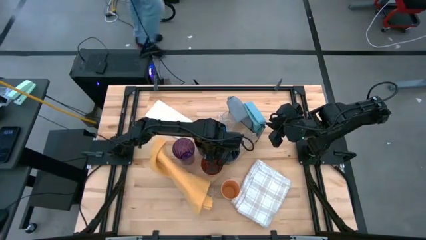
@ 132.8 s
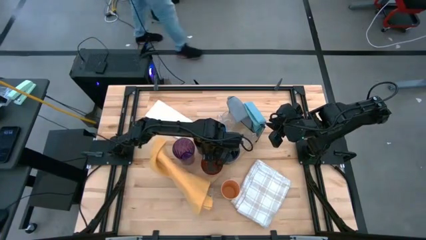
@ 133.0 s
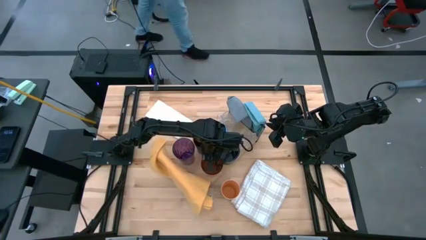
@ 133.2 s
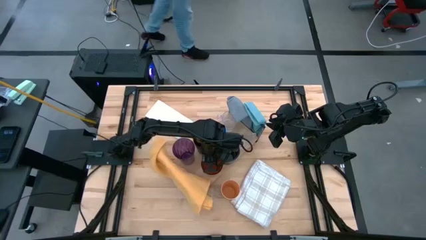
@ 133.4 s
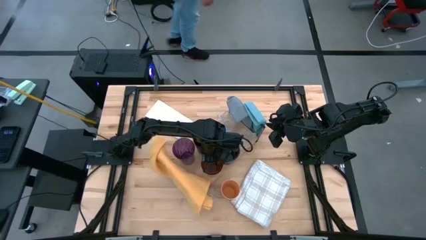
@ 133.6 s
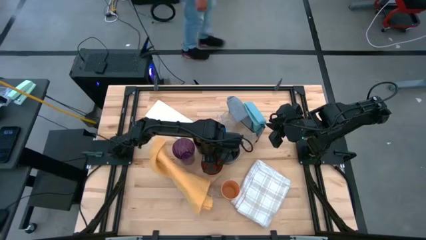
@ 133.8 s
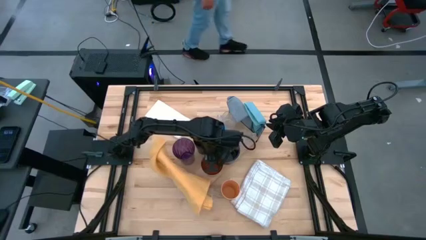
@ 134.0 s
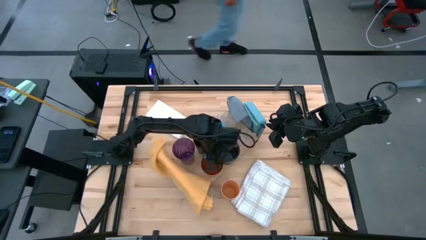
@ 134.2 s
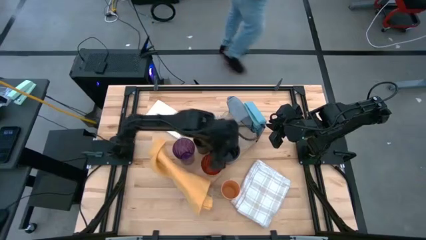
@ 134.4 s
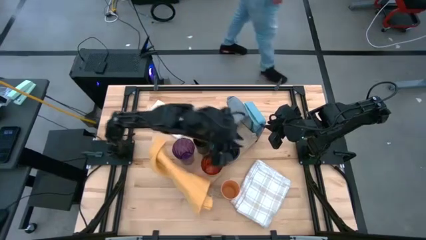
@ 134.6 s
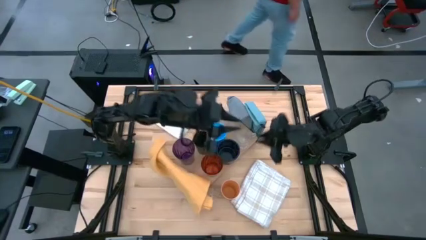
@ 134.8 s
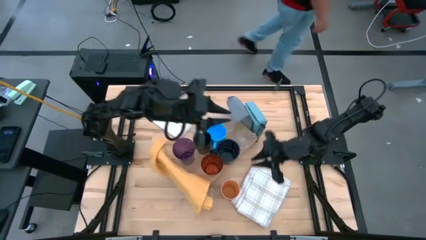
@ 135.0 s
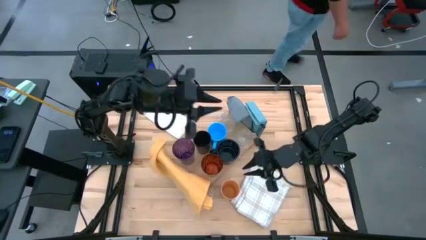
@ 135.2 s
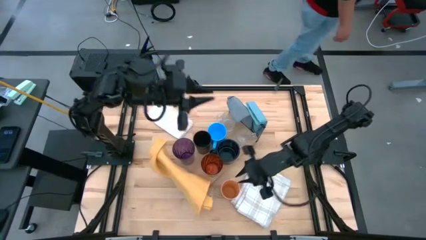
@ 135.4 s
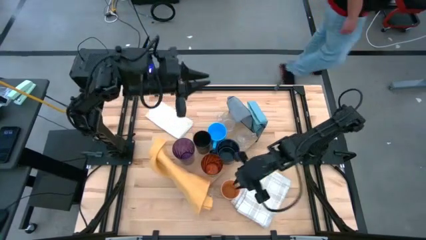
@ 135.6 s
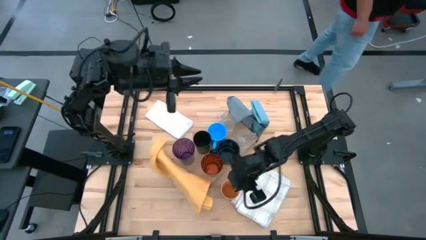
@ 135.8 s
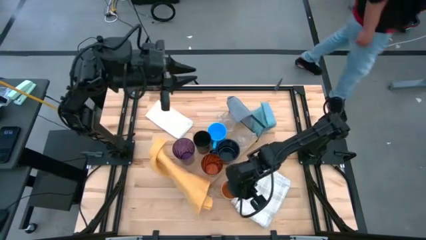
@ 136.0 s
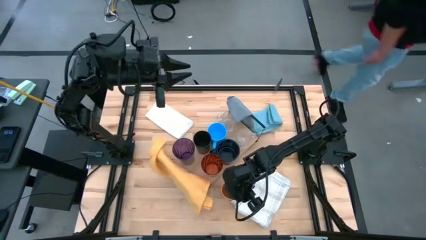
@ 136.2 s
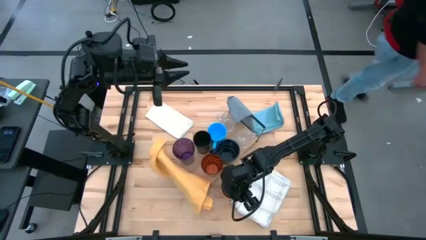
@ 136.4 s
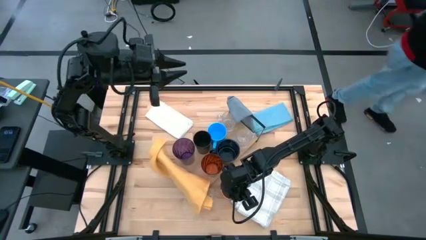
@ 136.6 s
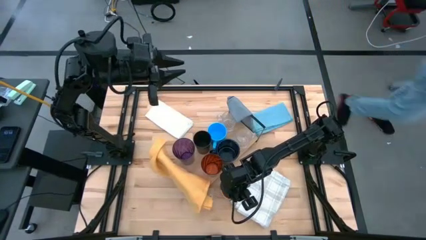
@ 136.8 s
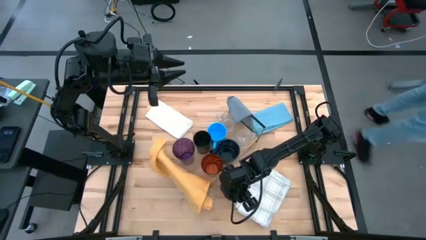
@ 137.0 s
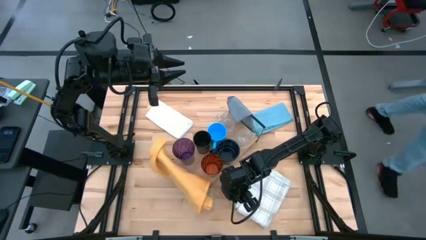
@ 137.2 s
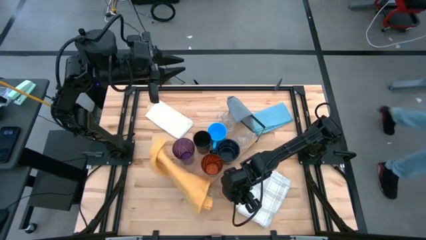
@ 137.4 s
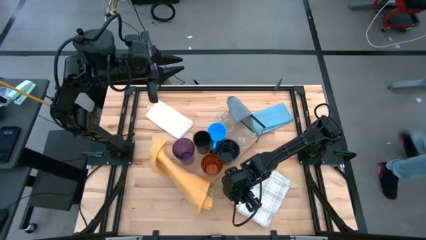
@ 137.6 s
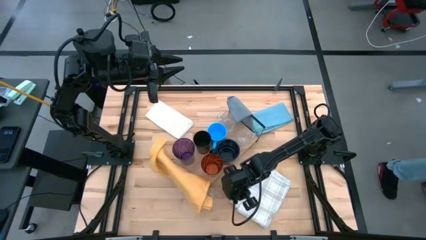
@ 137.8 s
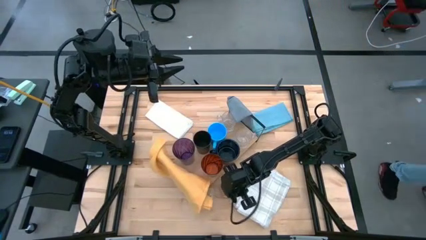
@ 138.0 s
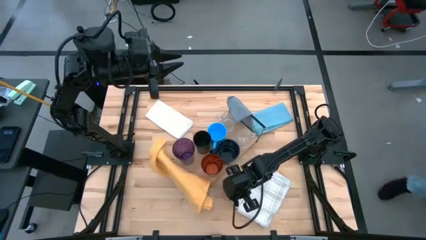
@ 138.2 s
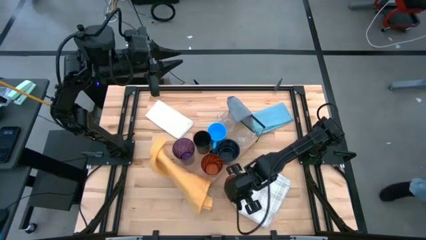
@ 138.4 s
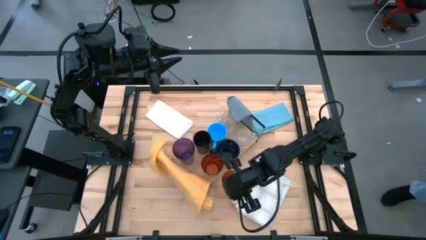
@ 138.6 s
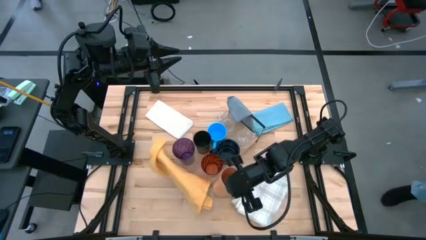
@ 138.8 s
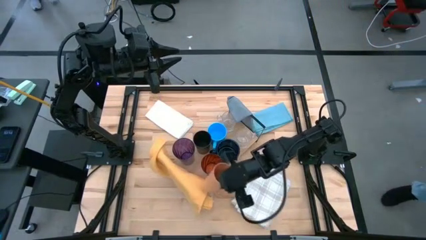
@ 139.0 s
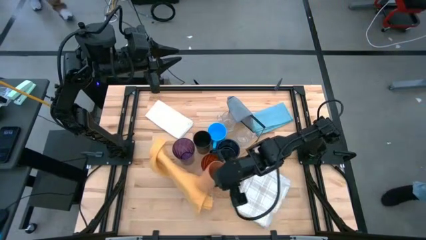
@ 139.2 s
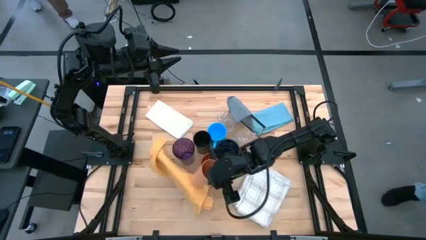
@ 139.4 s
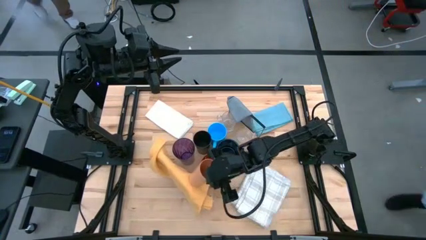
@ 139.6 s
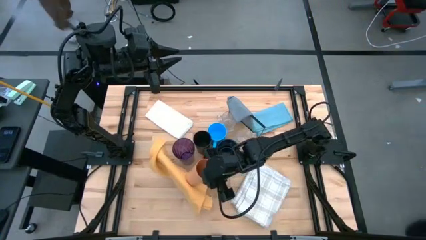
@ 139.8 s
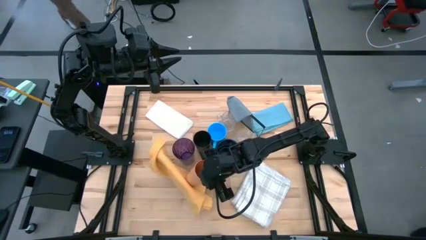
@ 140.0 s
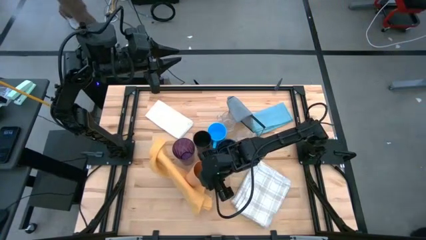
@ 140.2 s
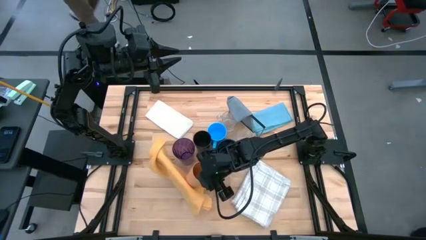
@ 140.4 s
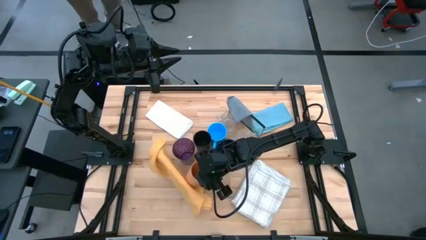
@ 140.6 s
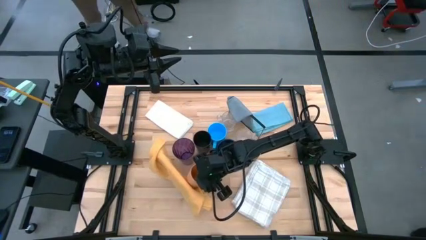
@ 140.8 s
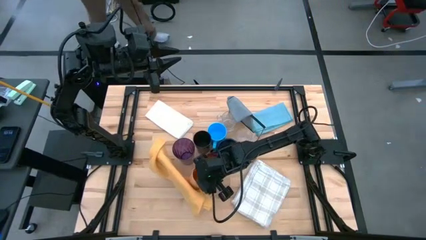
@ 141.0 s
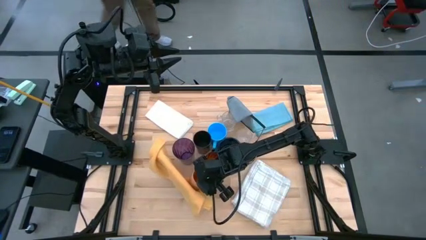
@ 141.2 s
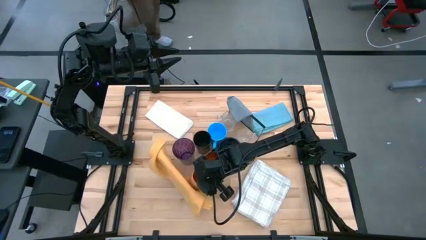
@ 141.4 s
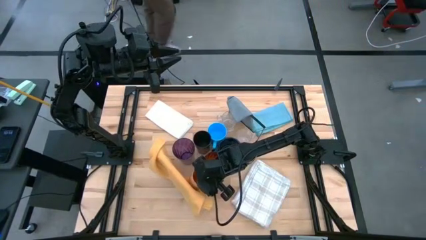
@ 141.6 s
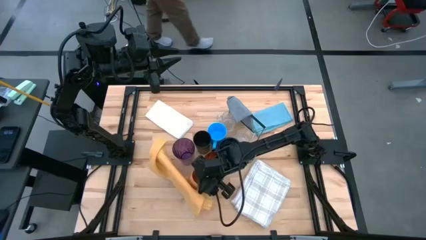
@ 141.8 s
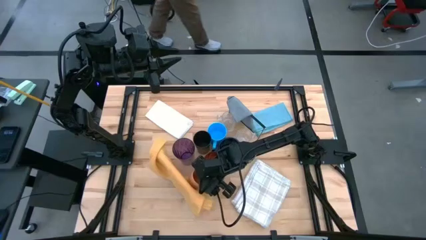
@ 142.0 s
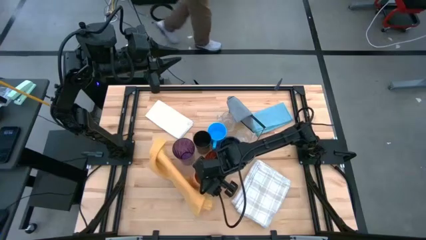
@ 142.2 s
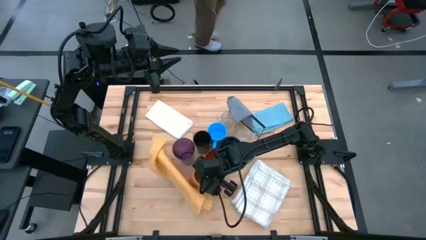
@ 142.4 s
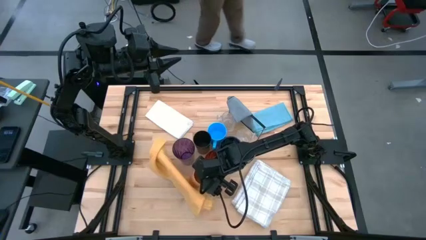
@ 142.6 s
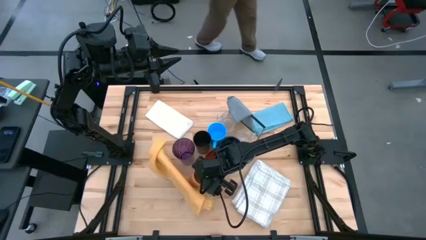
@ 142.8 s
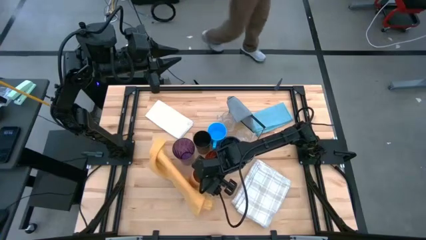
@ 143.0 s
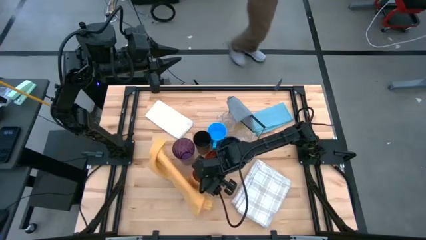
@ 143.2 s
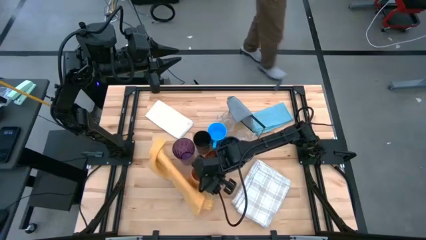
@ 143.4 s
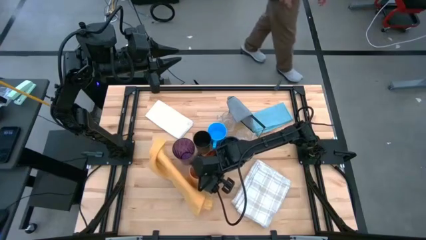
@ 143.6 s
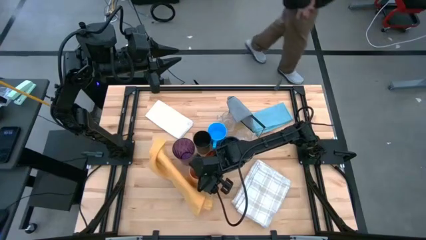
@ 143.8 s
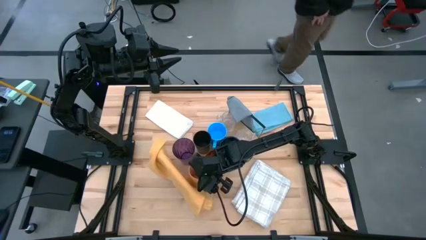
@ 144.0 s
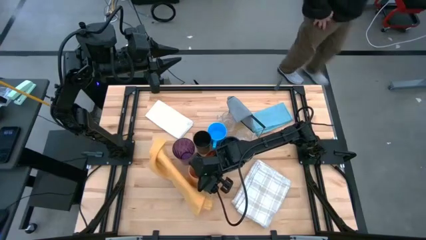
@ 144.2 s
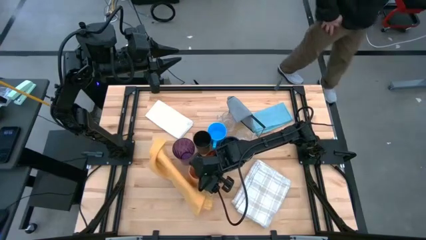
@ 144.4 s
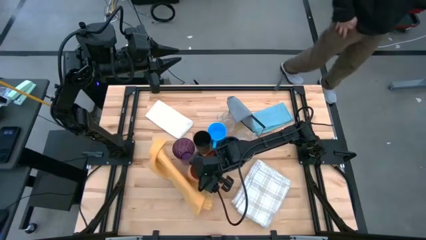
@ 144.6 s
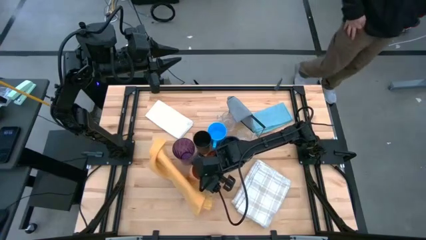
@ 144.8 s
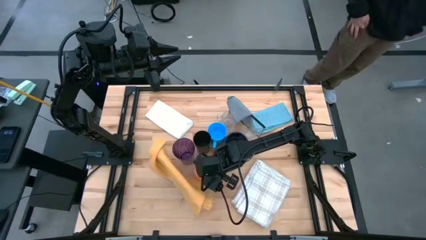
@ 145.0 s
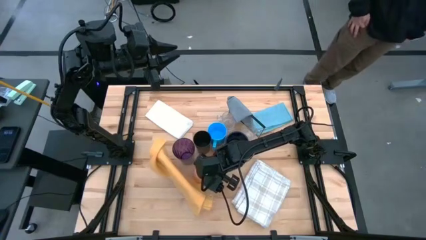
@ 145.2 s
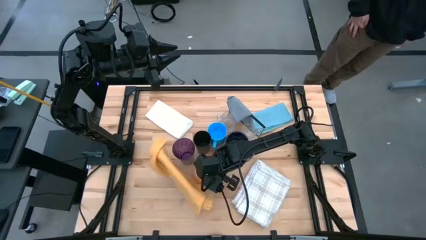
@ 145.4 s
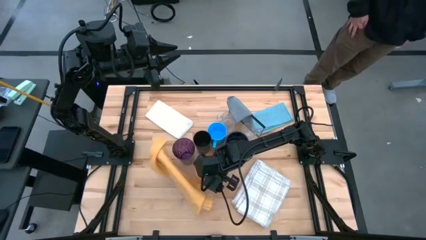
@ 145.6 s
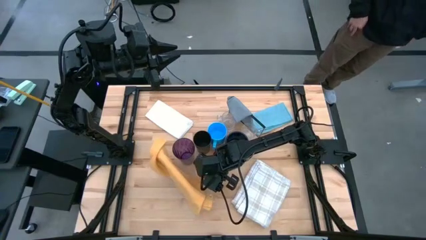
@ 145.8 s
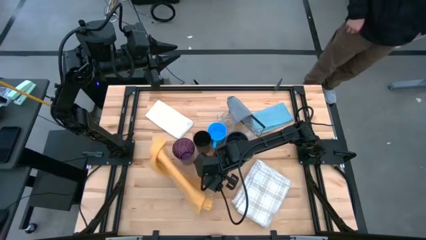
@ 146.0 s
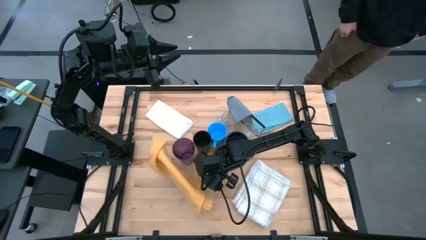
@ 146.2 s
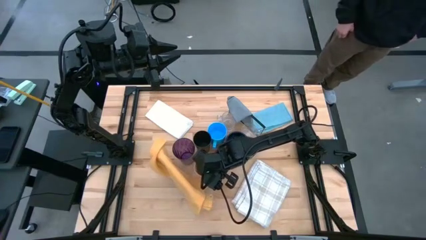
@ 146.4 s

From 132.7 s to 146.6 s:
Task: Stack small to large cups/mugs on shelf
Put the orange cup on the shelf
